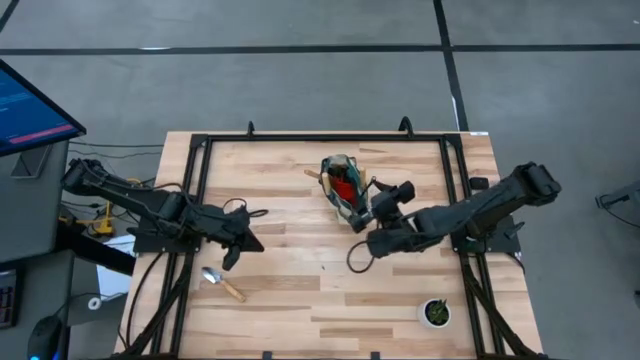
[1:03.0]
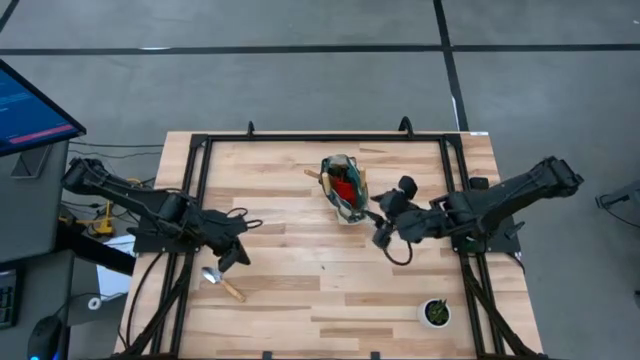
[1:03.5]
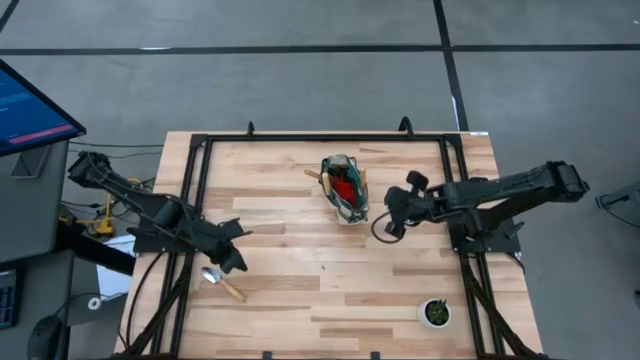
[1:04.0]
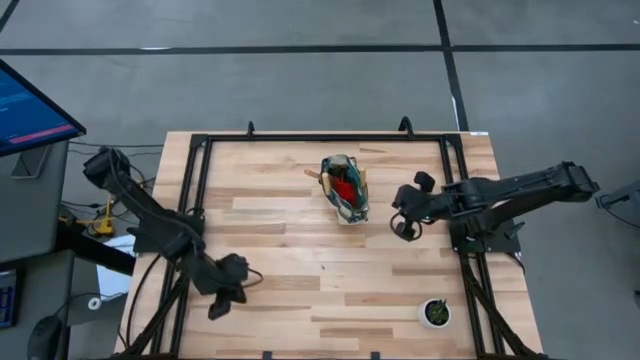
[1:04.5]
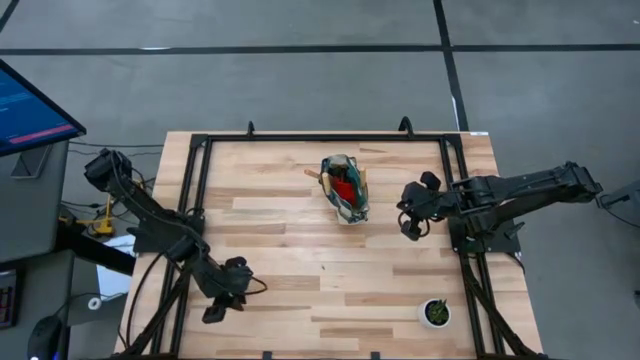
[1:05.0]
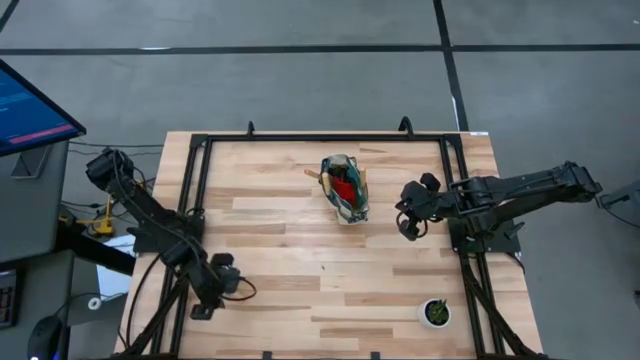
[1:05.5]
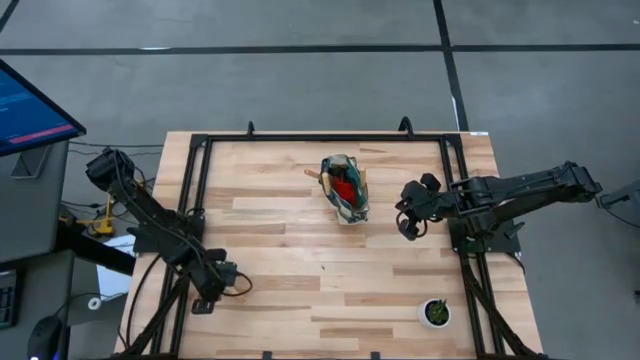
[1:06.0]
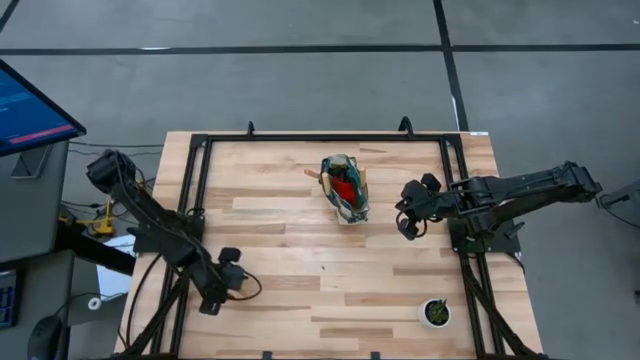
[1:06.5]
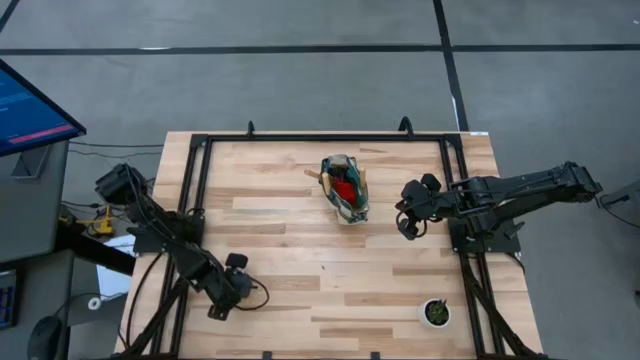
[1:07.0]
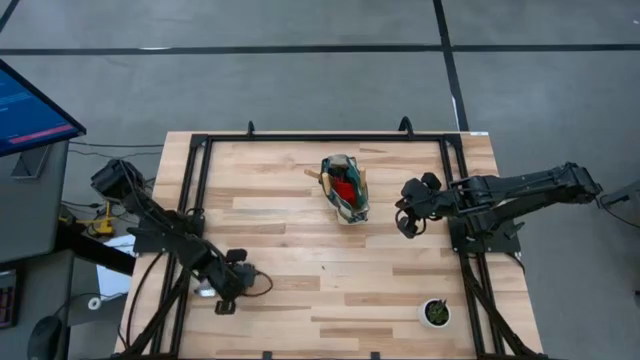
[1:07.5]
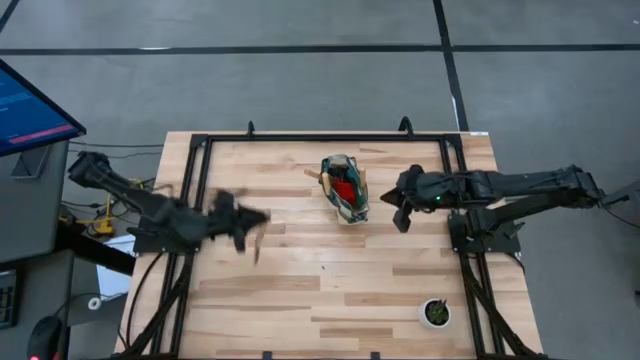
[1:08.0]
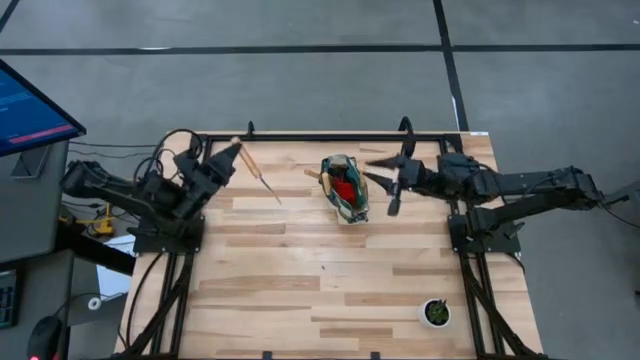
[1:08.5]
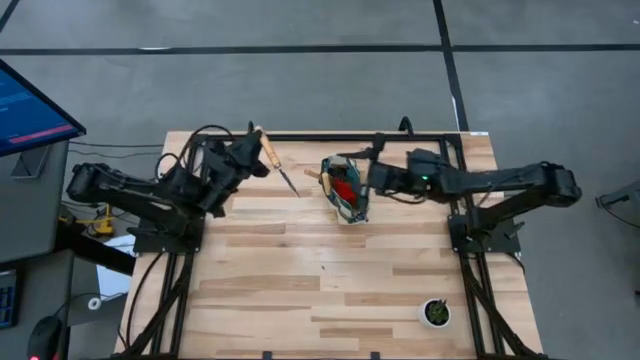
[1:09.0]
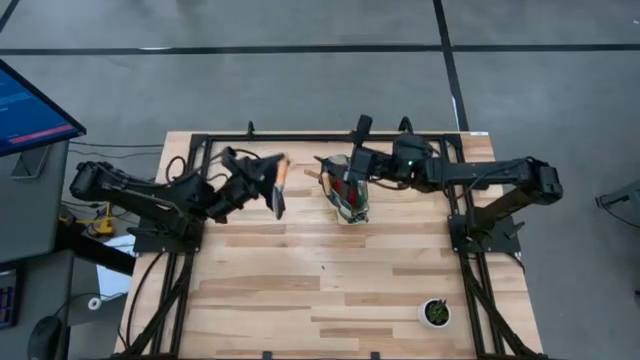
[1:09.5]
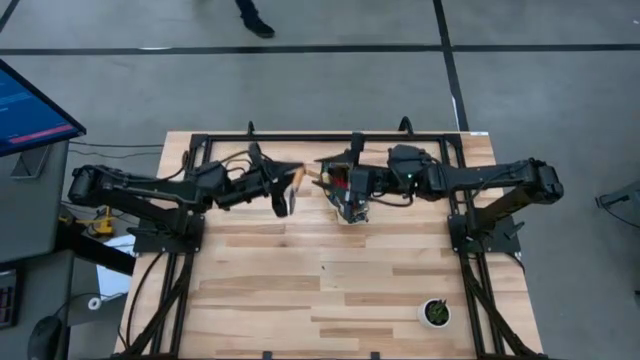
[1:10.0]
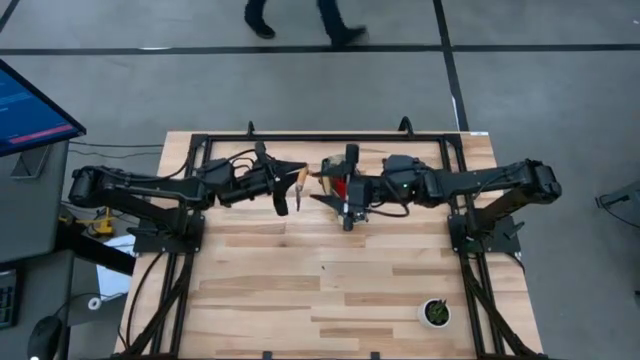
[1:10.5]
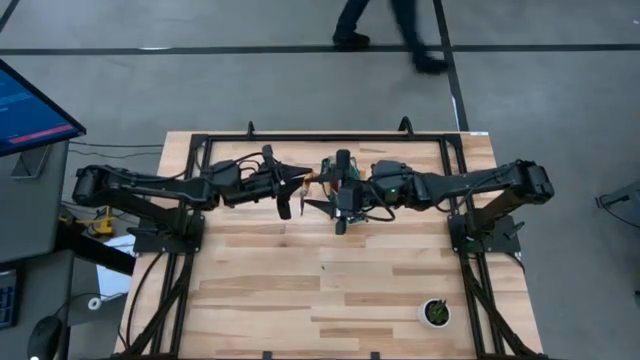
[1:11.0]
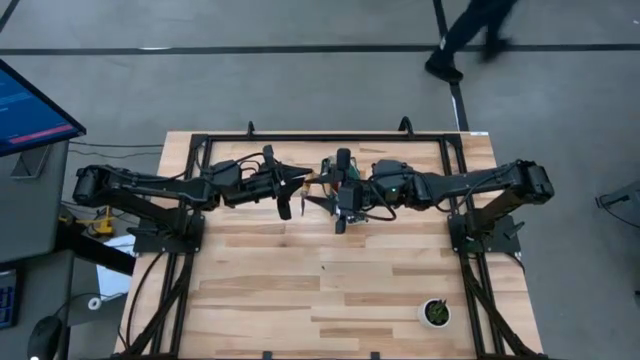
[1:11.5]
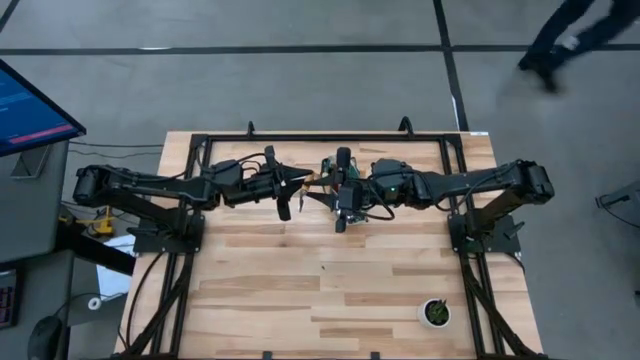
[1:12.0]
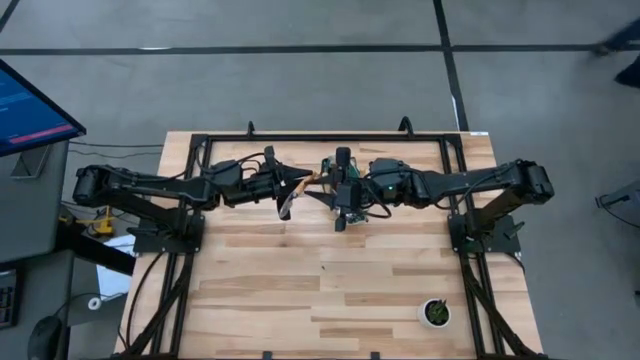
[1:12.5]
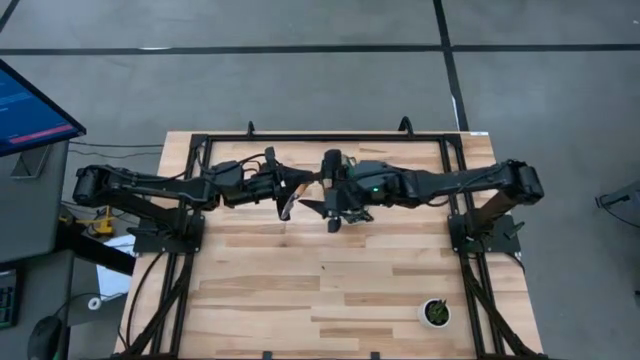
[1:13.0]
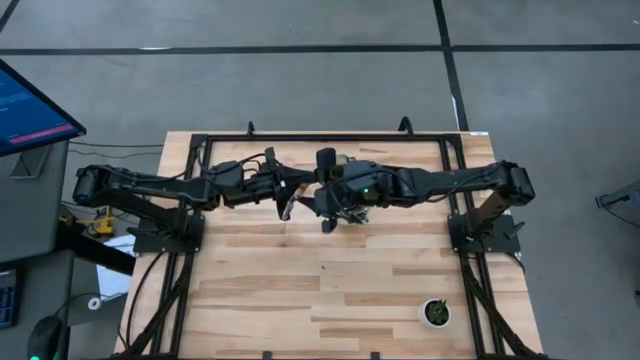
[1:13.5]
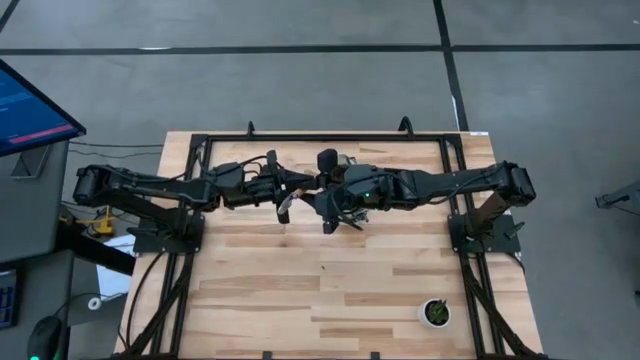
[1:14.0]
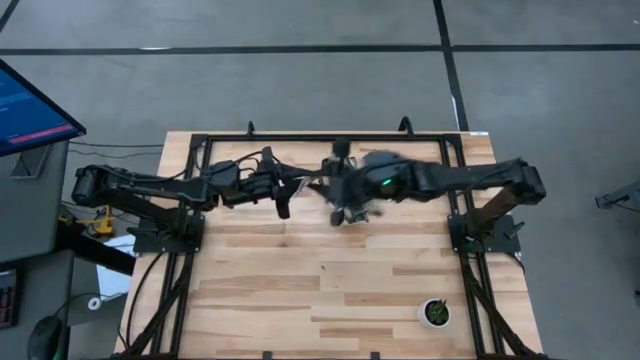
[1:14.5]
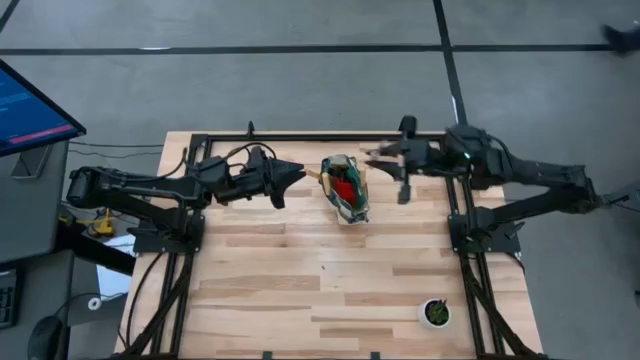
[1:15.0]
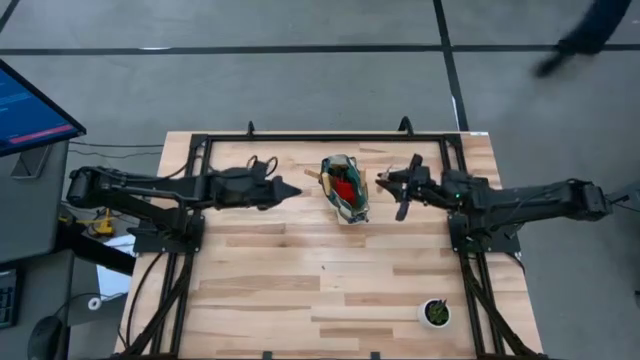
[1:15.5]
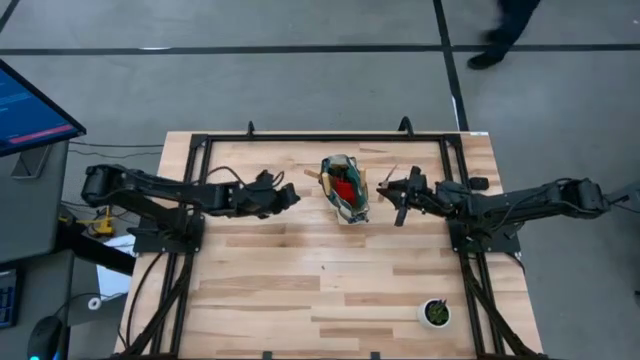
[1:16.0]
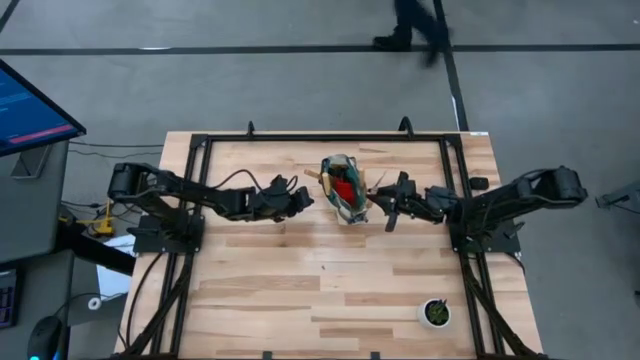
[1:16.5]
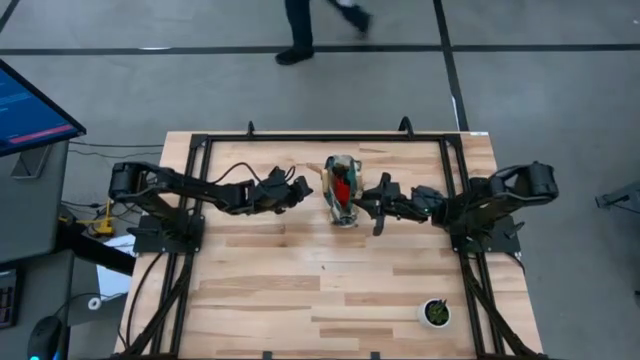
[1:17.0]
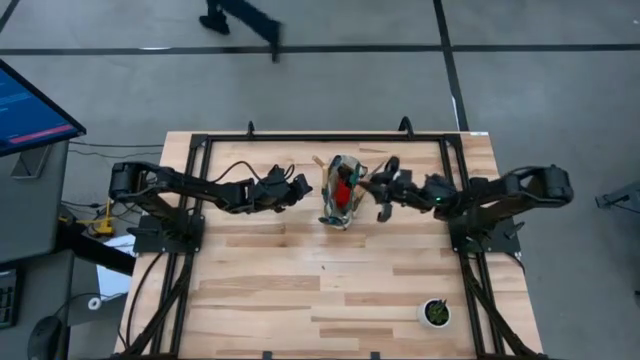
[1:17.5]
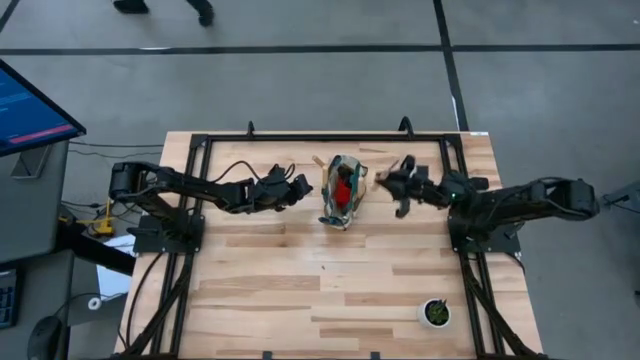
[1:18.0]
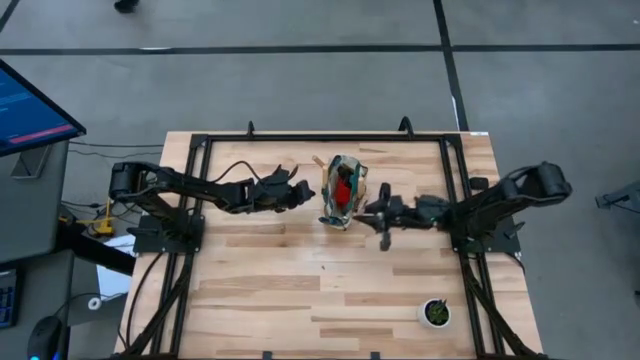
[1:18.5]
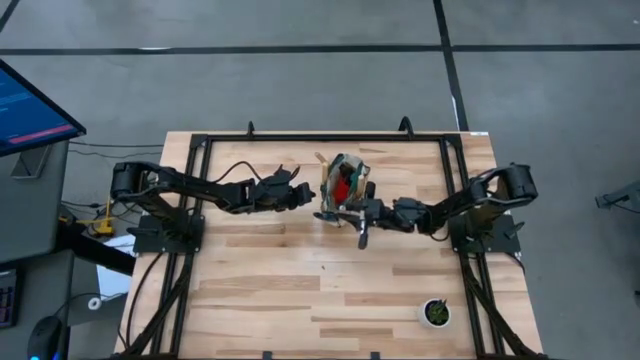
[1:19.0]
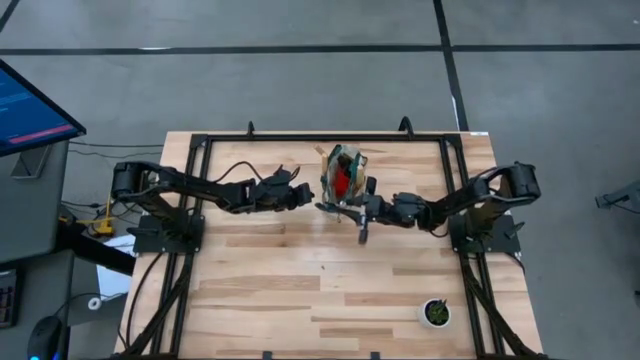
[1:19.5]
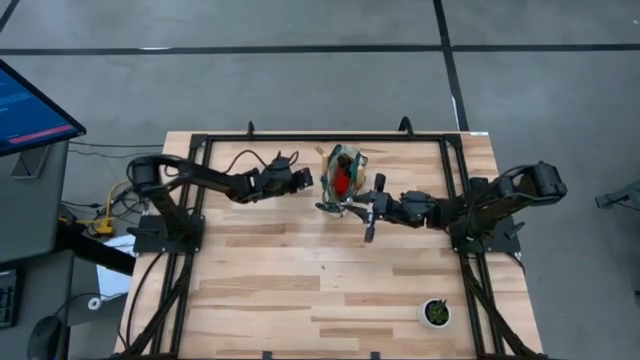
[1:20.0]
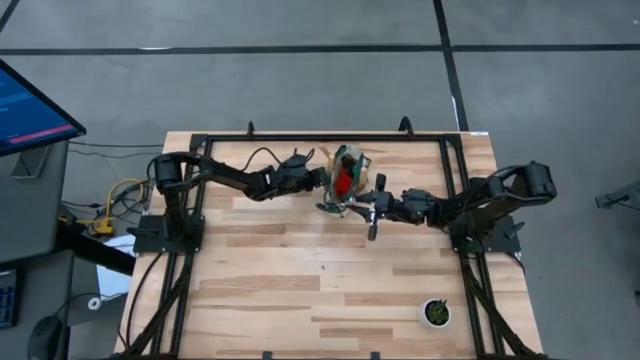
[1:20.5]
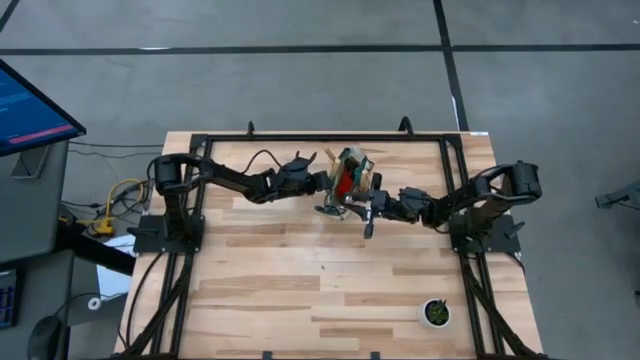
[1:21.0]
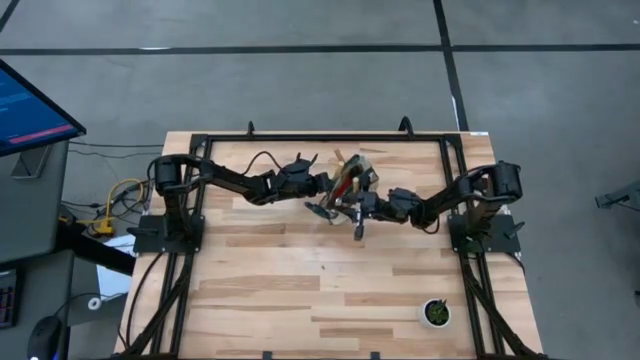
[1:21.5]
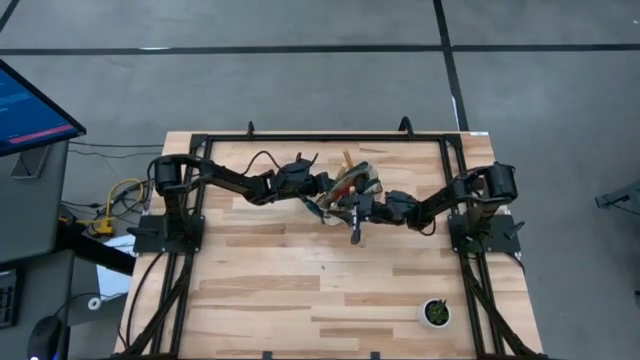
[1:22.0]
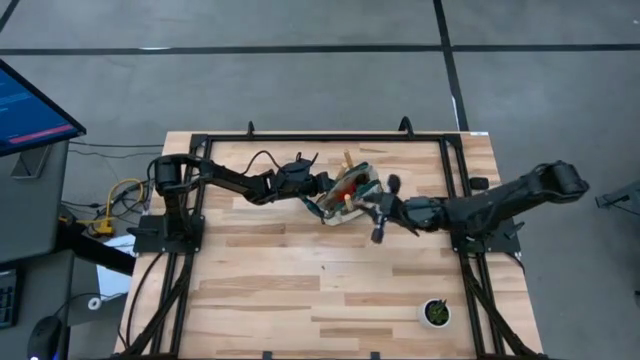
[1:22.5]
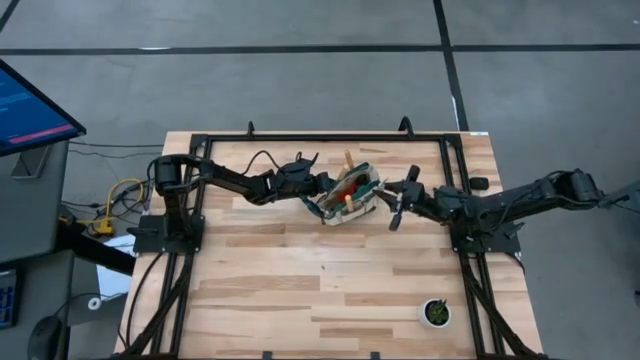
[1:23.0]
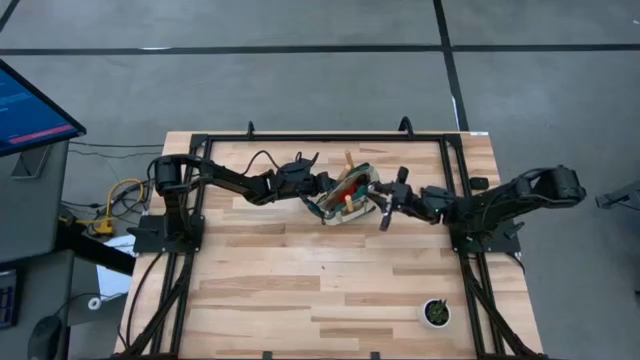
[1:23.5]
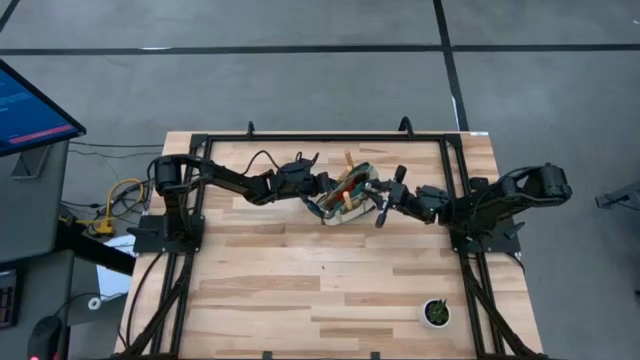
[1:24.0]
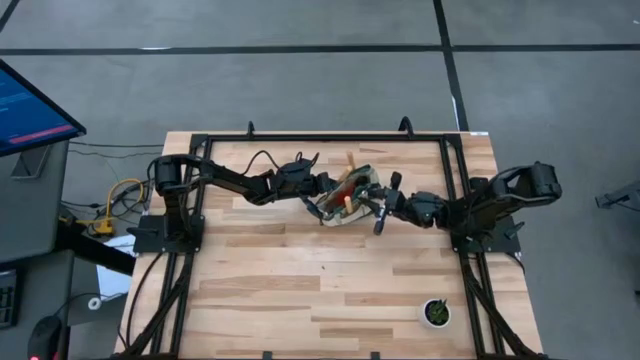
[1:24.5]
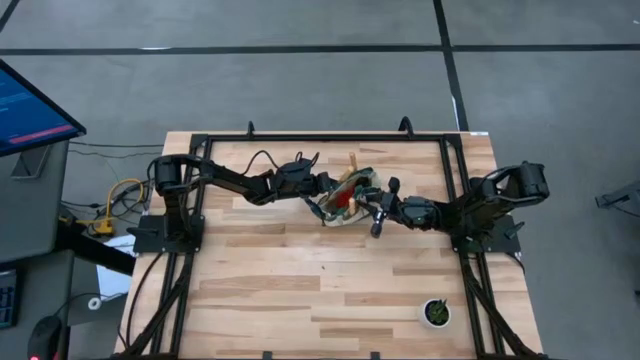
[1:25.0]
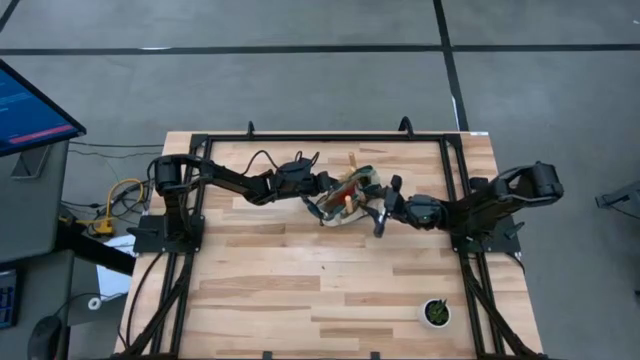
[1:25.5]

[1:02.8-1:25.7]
Task: Pick & Place Garden tools in Gardening bag
Put the trowel into the gardening bag
